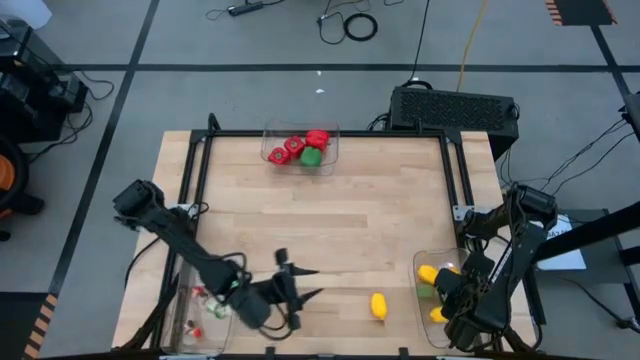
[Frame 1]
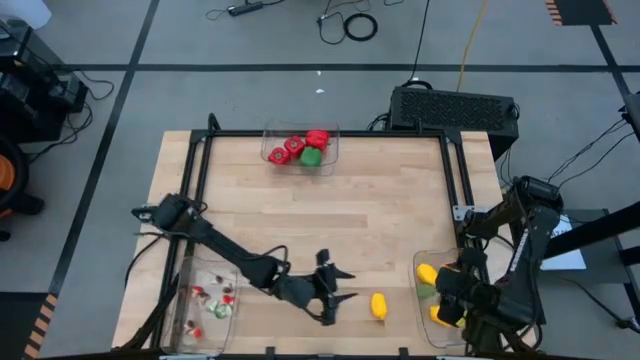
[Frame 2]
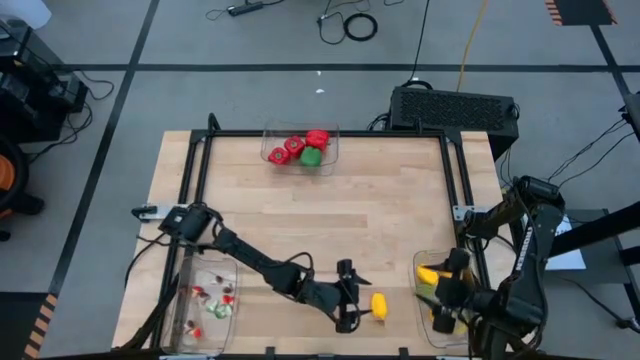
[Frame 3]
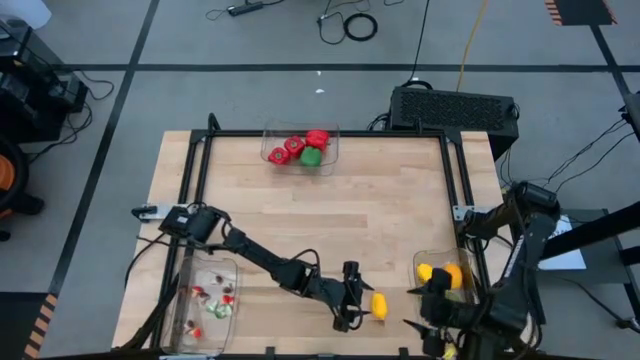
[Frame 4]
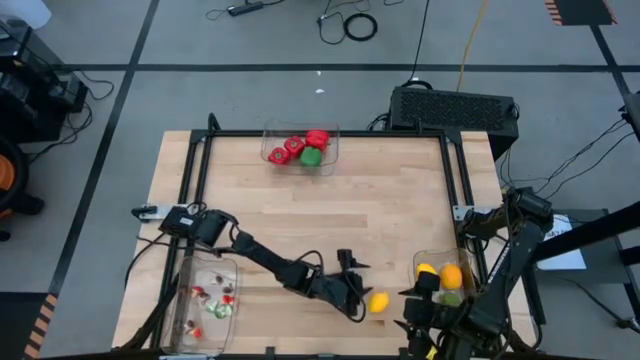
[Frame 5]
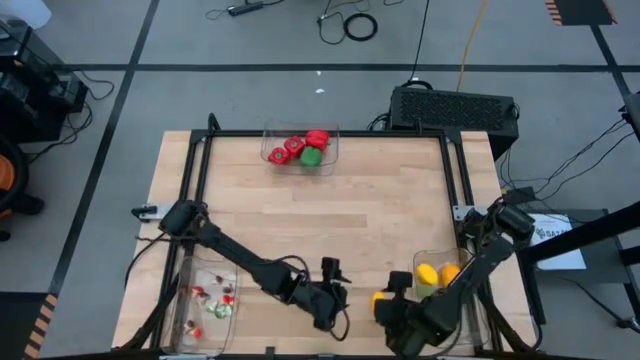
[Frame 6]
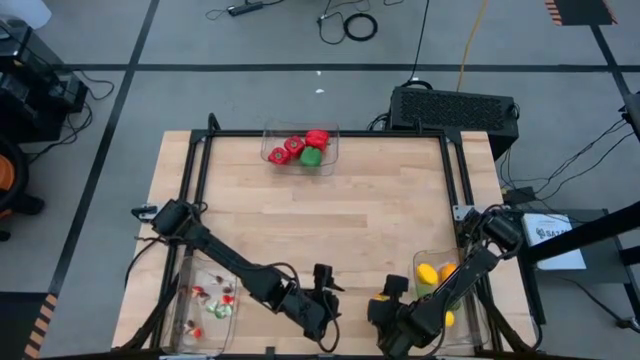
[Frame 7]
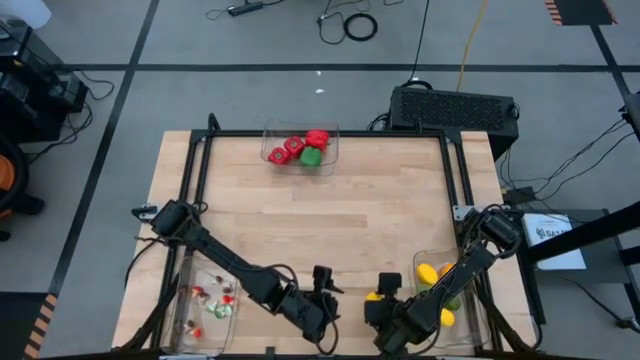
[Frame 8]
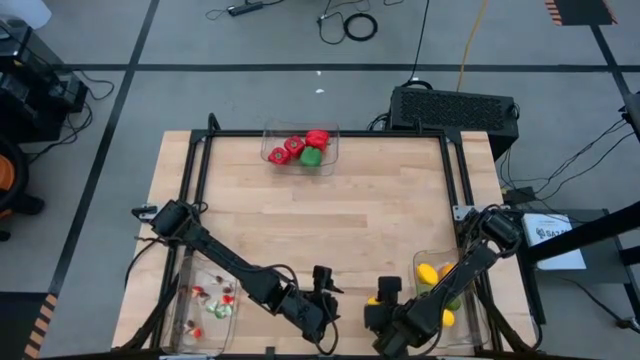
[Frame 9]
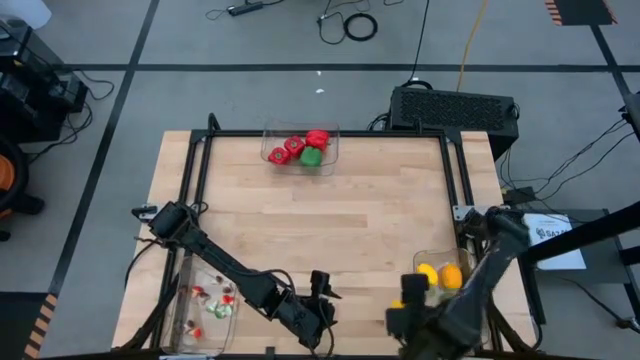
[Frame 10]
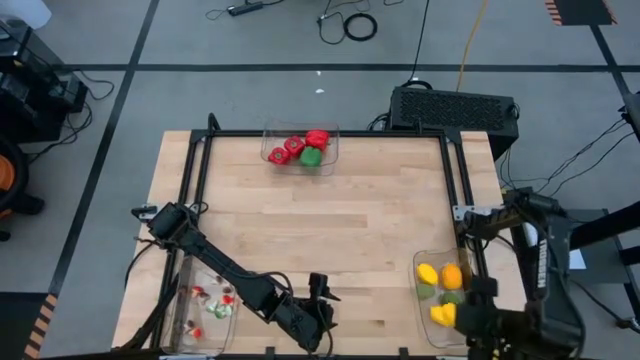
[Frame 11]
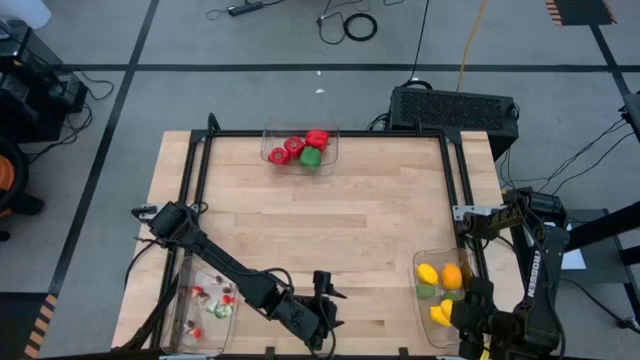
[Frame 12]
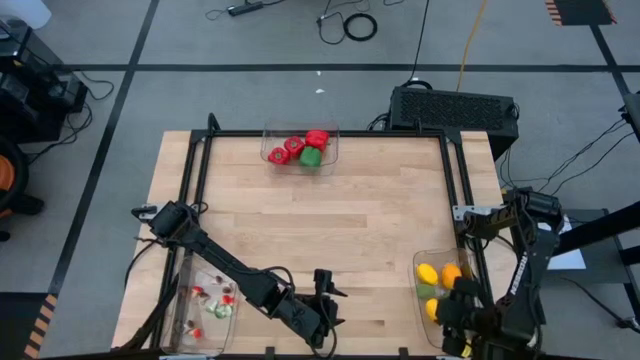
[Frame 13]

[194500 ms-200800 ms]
Task: Sort produce into baskets
Put the yellow lemon into the bottom right transparent bin

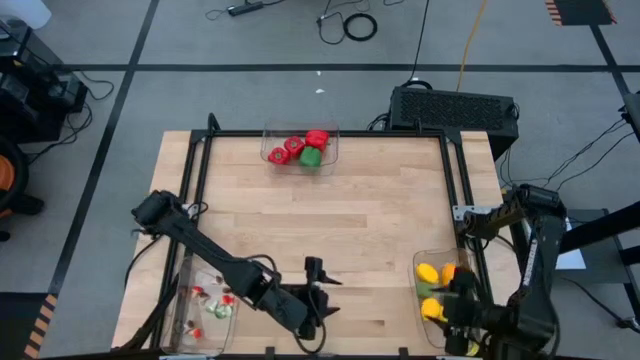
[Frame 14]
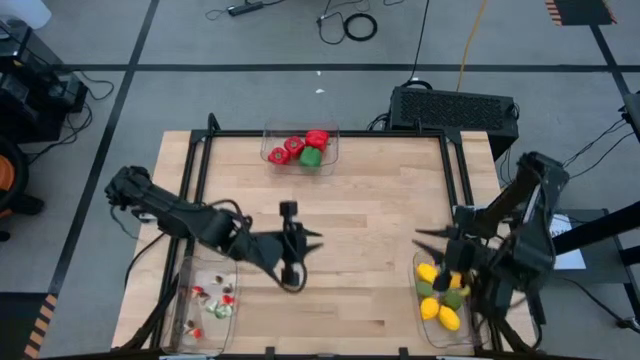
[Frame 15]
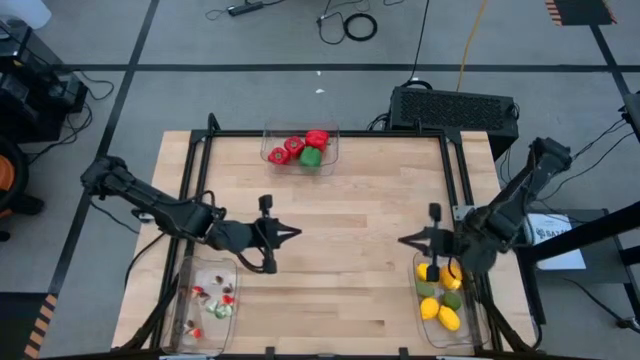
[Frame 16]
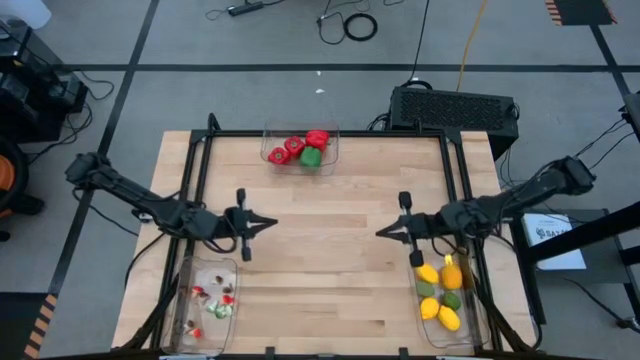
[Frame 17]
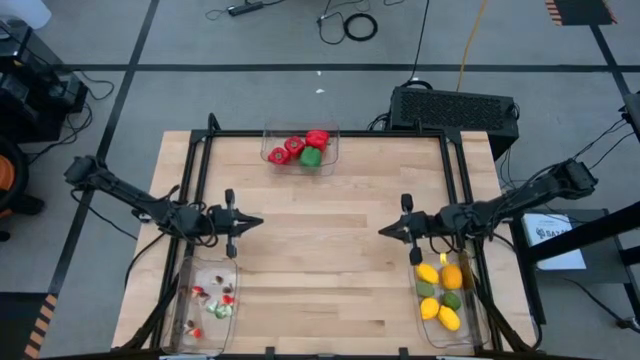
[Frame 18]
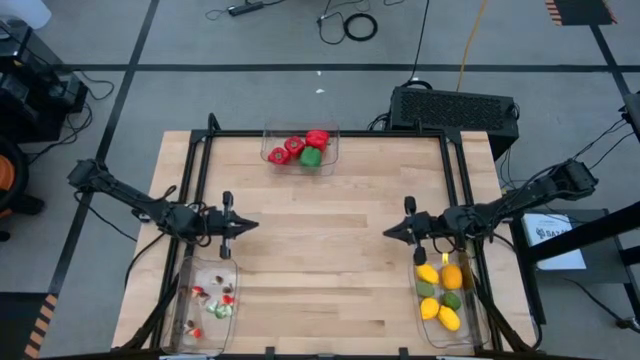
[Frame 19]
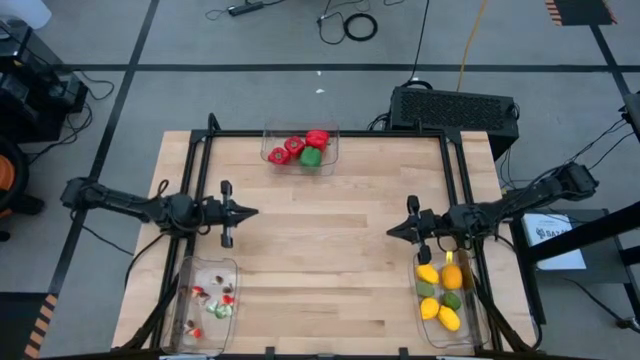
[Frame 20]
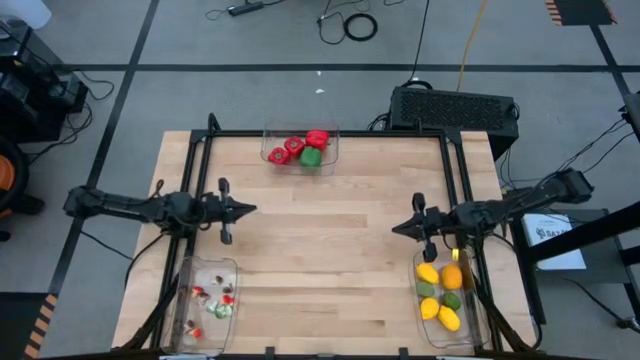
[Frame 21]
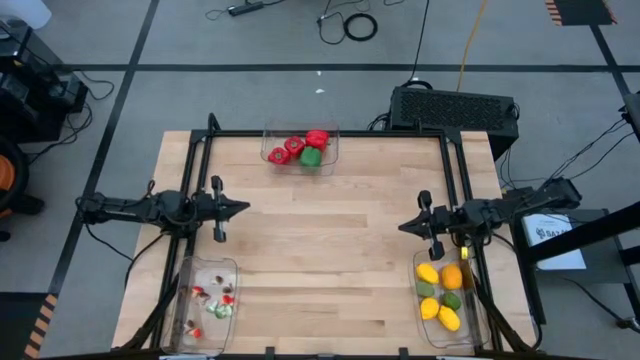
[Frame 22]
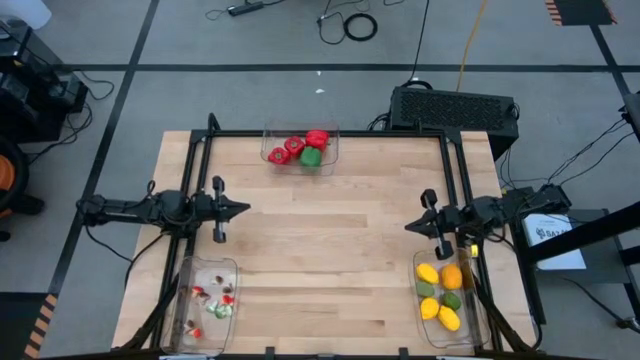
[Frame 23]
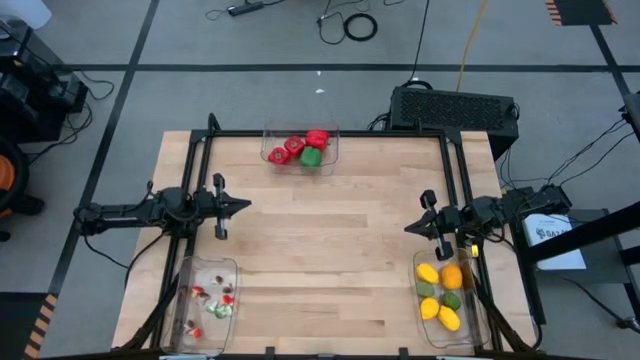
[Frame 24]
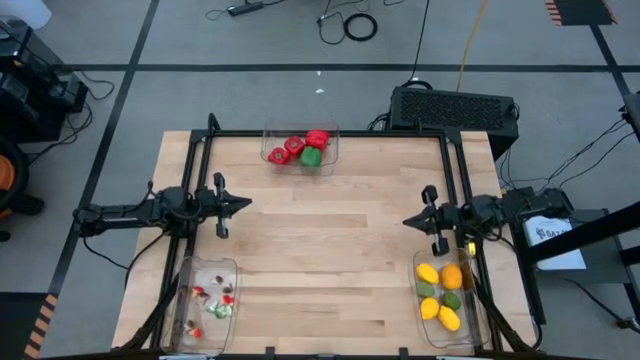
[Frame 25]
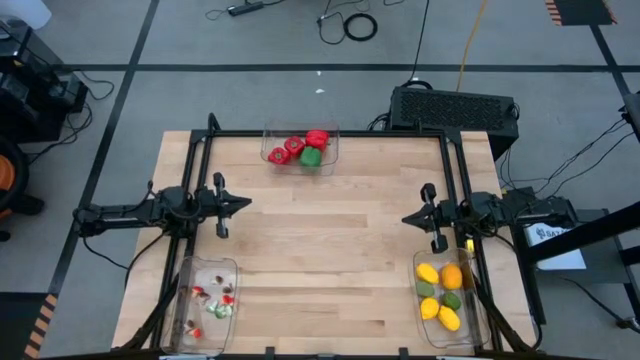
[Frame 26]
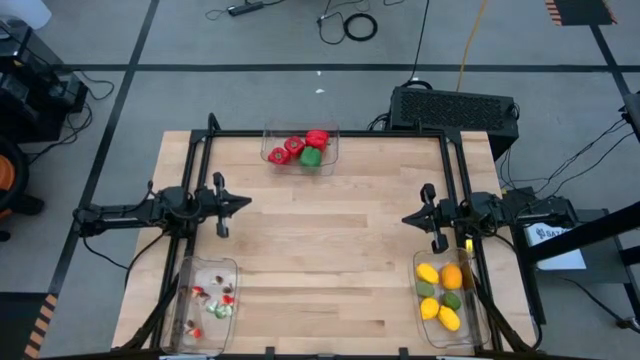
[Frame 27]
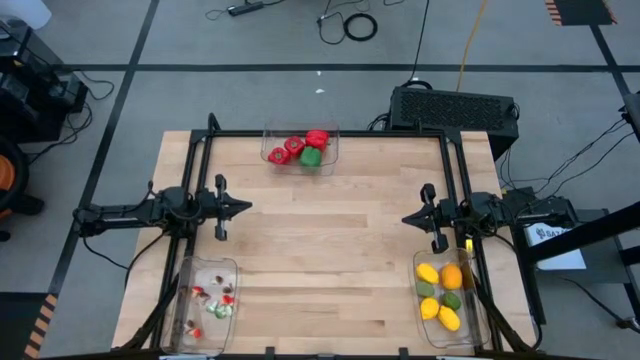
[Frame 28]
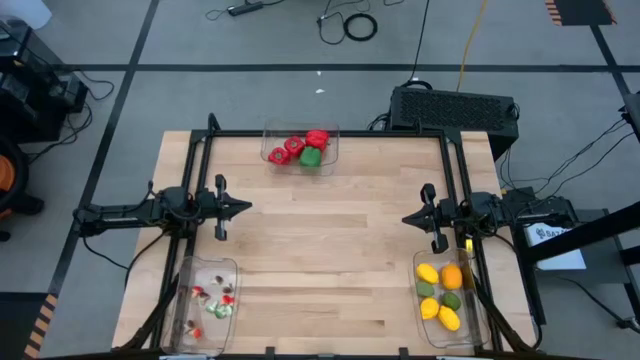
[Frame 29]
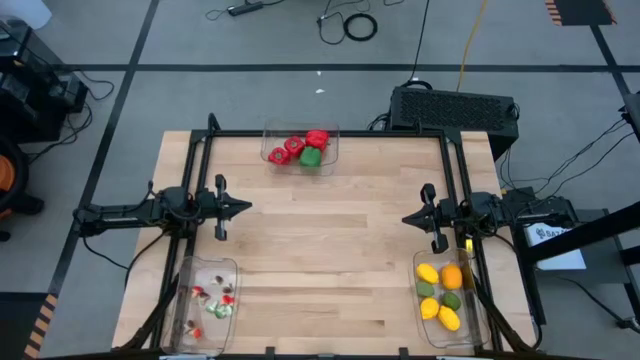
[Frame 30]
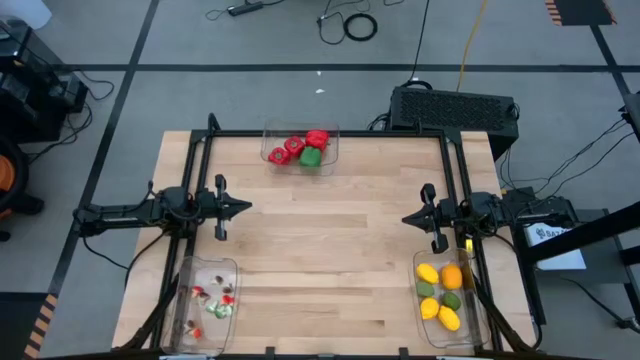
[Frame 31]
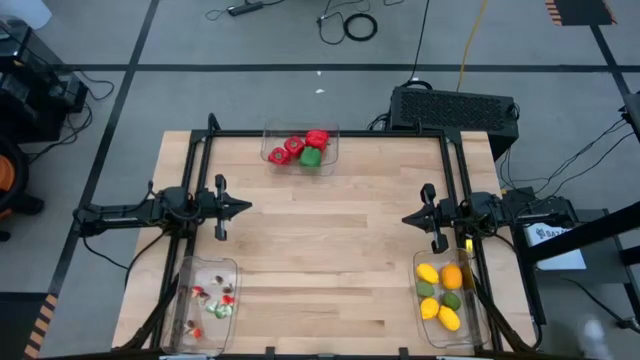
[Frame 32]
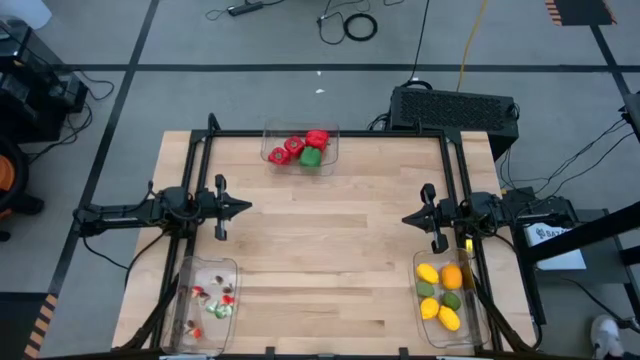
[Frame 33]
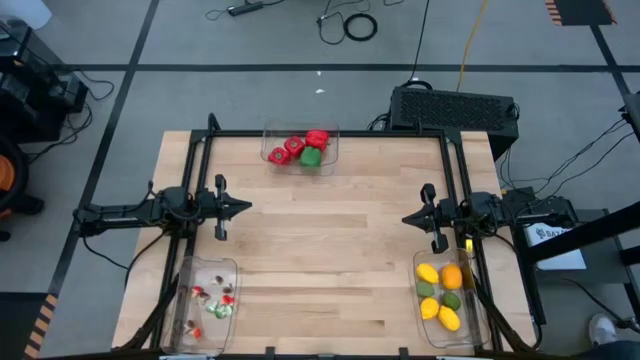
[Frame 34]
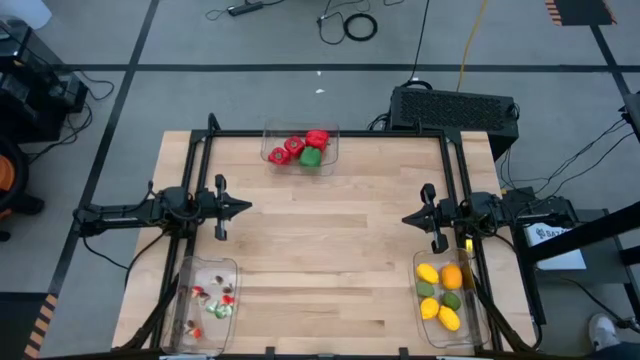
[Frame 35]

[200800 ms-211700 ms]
Return To Home Position

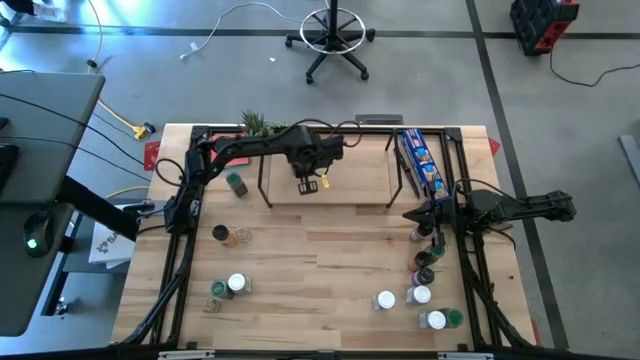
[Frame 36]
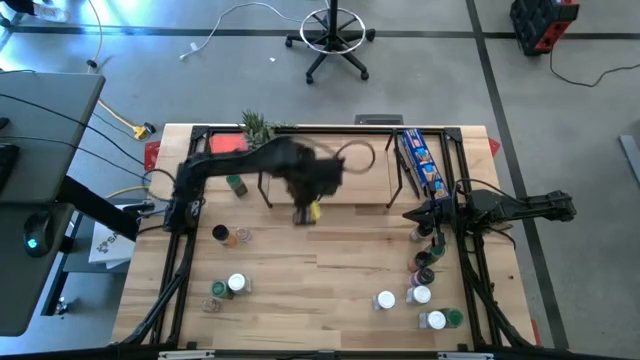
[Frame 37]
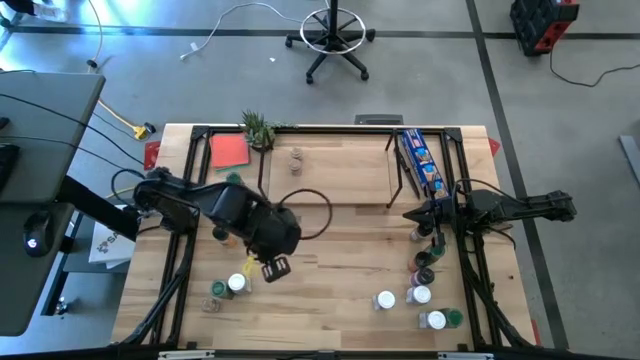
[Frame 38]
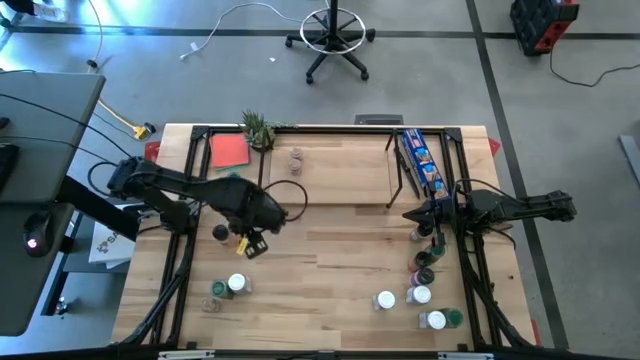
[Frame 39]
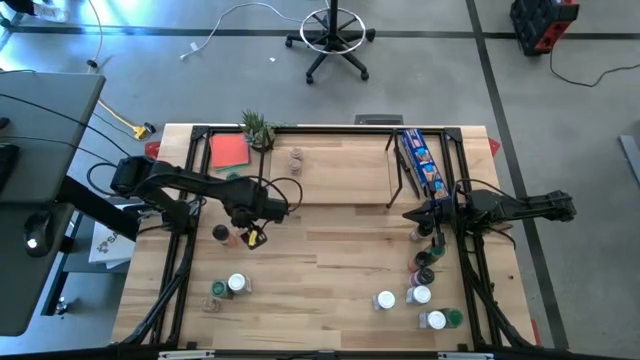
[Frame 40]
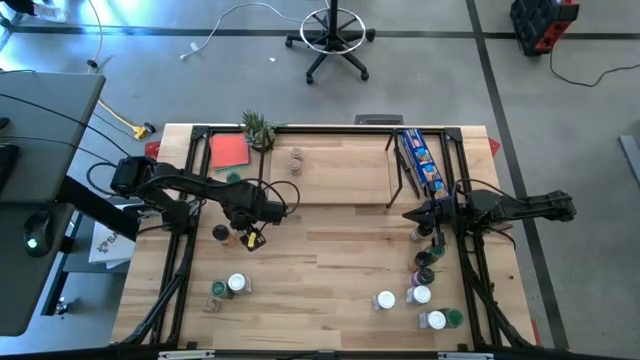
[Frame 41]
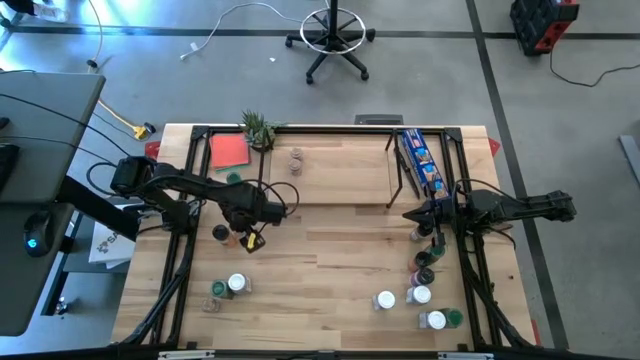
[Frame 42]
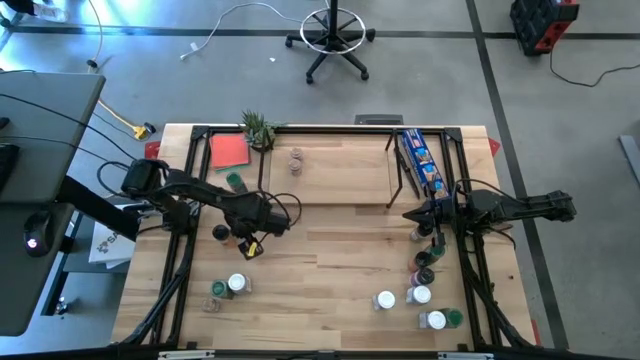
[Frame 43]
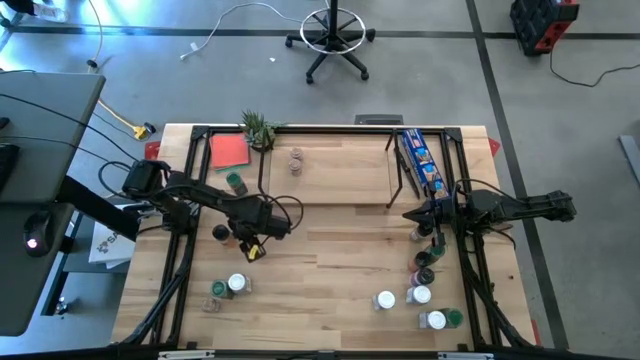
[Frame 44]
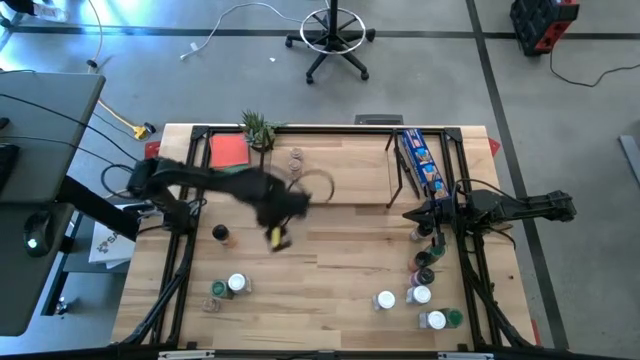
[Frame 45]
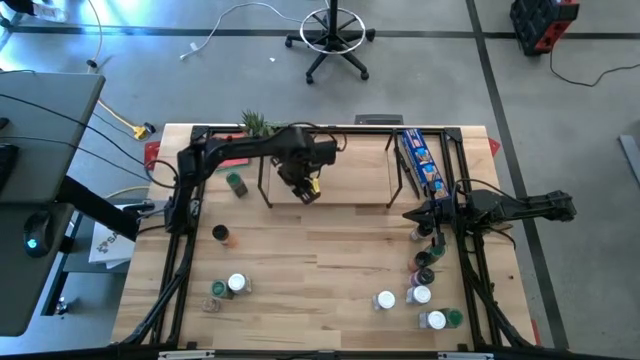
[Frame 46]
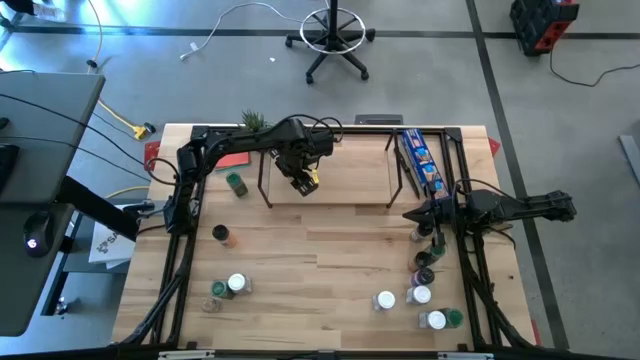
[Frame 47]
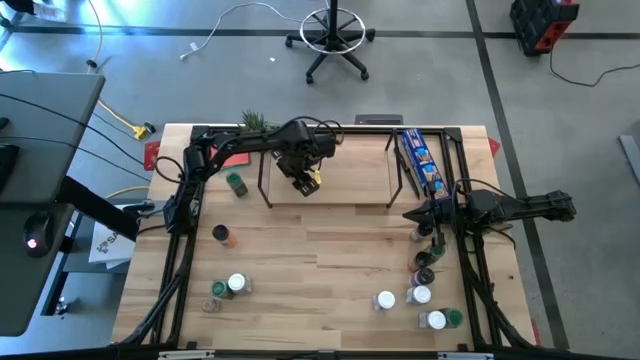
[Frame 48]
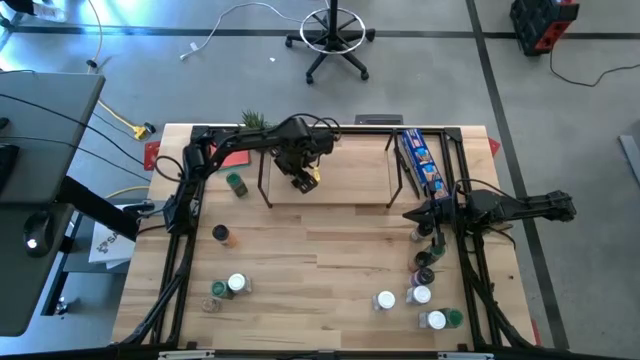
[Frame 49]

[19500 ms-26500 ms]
Task: Shelf spices
Put the brown seasoning bottle aligned with the other brown seasoning bottles on the shelf
